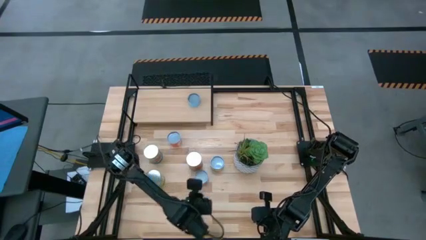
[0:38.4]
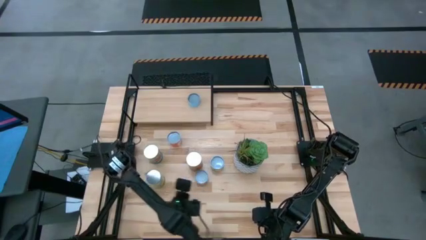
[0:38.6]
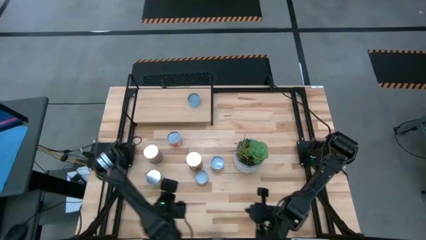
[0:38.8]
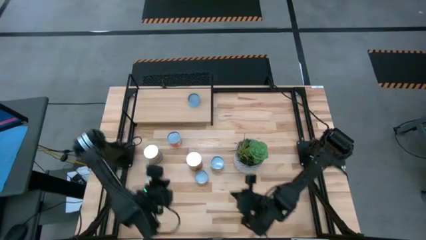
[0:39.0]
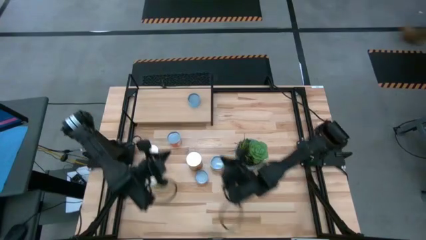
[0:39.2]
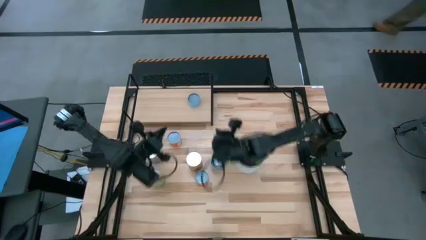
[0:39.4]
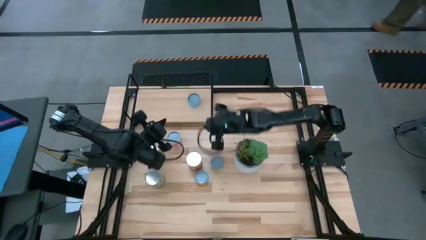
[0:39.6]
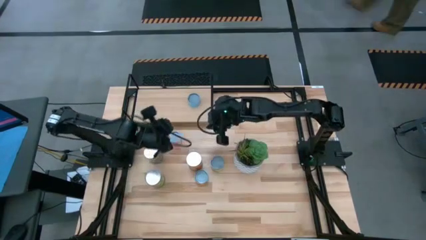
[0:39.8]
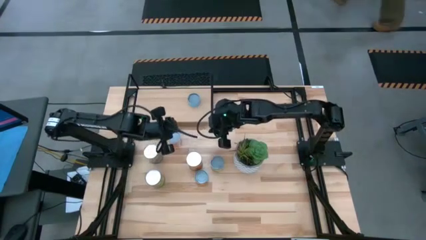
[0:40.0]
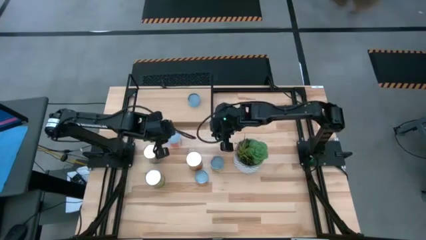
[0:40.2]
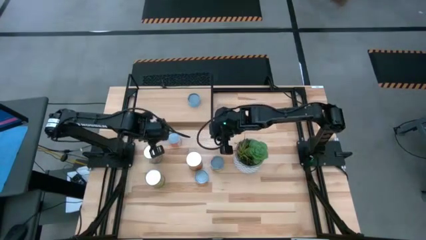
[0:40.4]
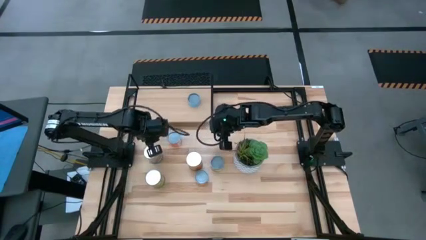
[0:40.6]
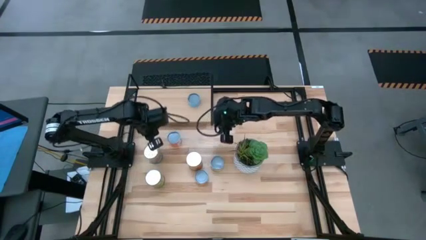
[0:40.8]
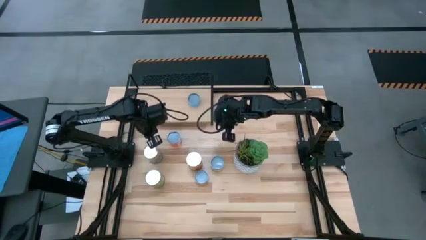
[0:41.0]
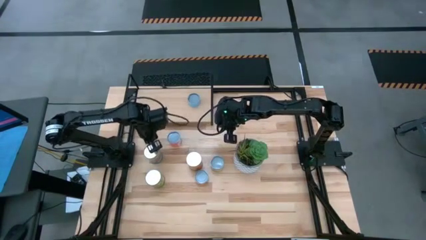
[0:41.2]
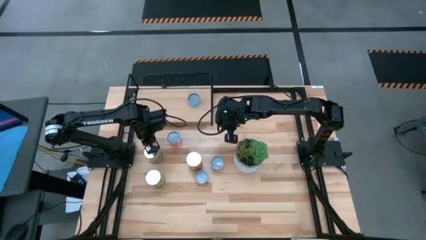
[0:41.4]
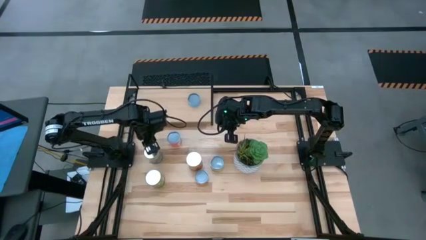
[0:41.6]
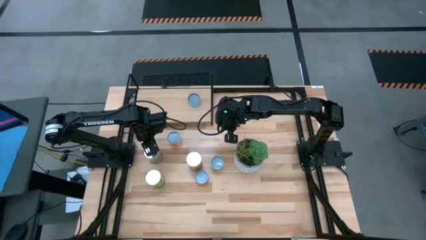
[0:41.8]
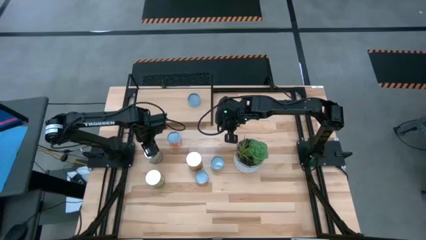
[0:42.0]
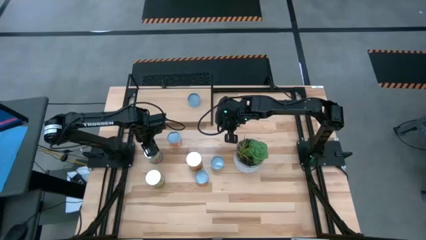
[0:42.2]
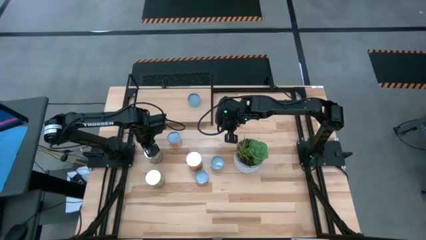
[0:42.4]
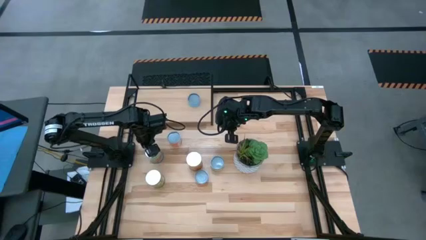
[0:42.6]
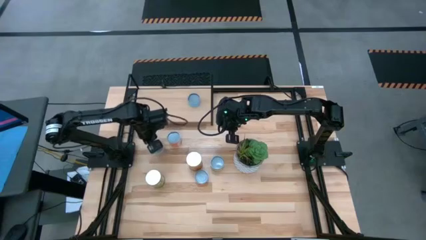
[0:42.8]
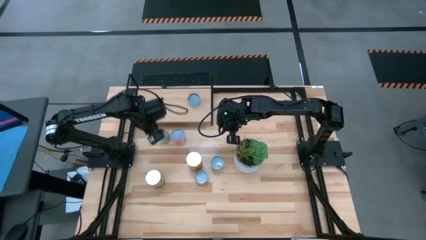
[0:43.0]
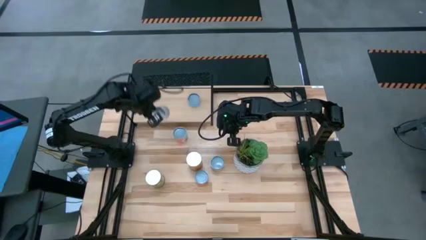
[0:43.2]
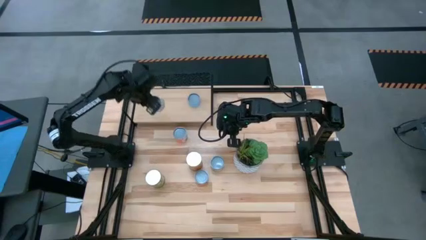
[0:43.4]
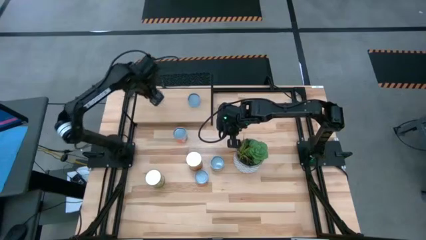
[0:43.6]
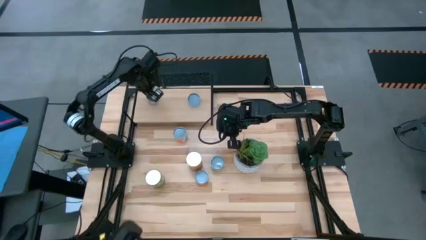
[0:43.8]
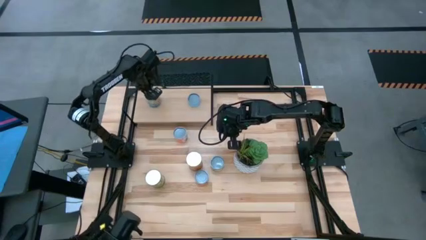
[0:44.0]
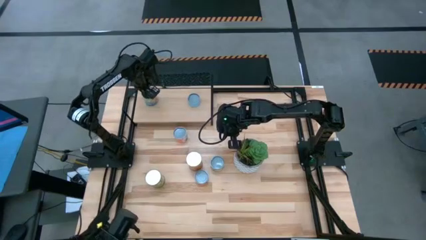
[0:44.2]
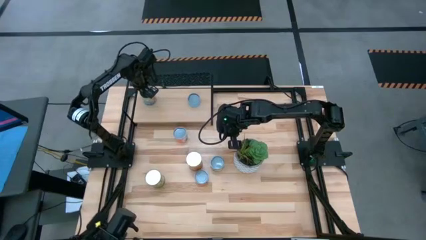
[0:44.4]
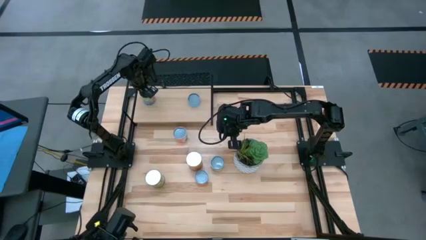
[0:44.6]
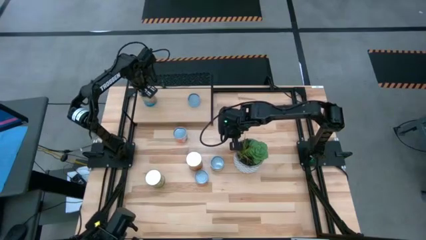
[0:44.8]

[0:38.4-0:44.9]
Task: Pick and place cans onto a shelf
Put the canned tomatoes on the shelf

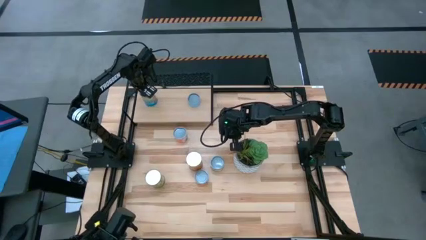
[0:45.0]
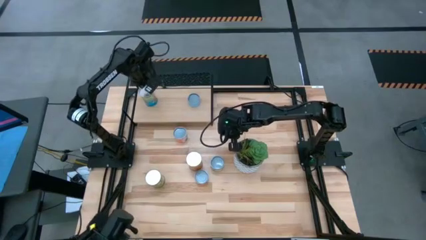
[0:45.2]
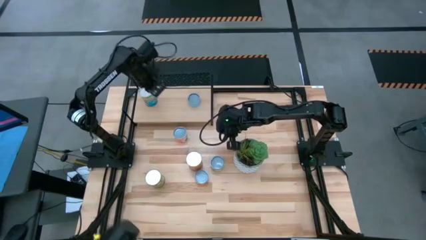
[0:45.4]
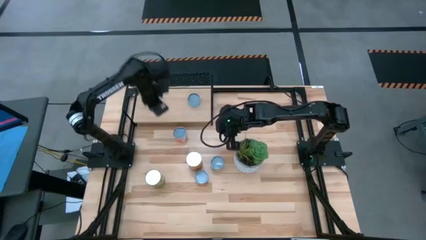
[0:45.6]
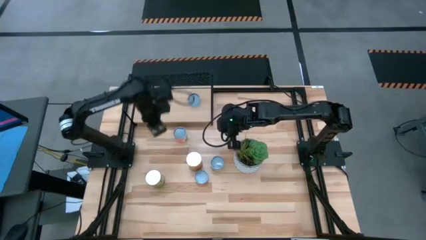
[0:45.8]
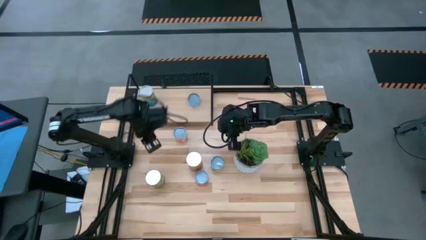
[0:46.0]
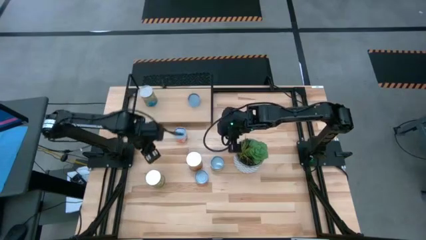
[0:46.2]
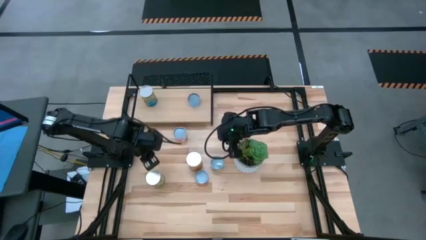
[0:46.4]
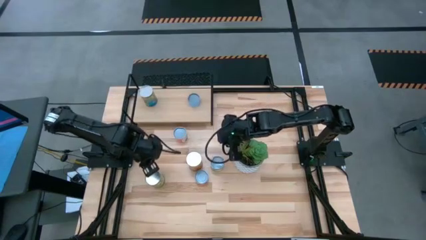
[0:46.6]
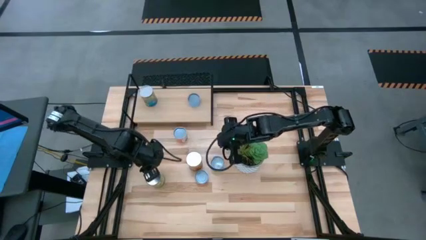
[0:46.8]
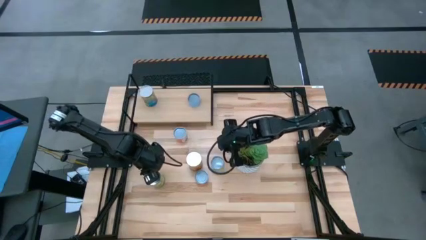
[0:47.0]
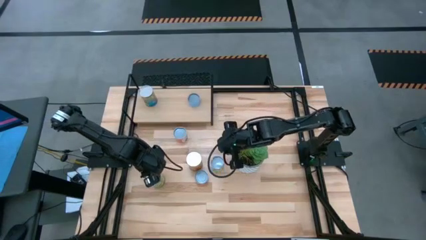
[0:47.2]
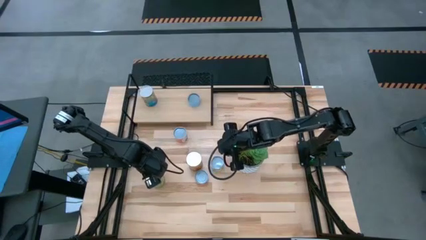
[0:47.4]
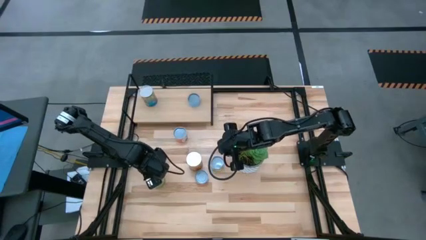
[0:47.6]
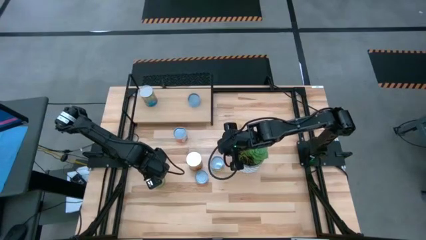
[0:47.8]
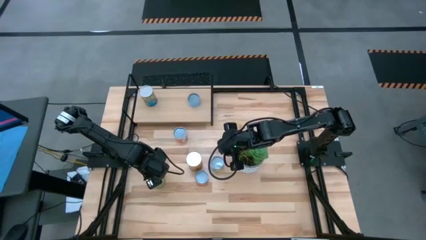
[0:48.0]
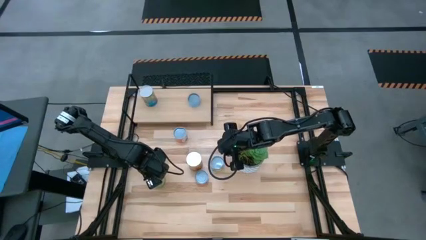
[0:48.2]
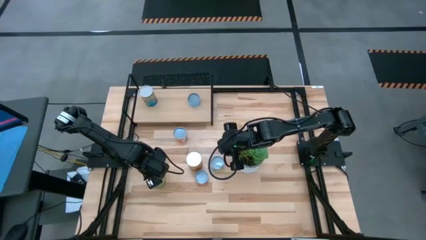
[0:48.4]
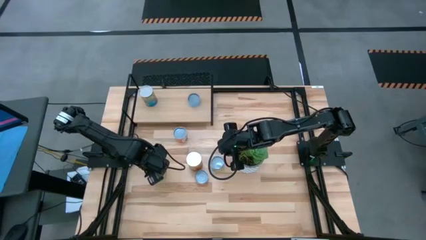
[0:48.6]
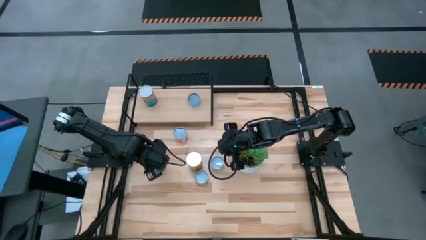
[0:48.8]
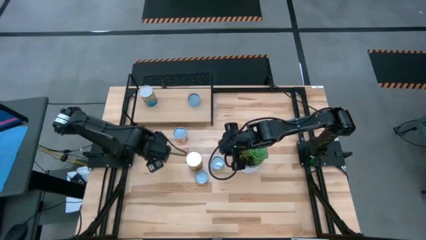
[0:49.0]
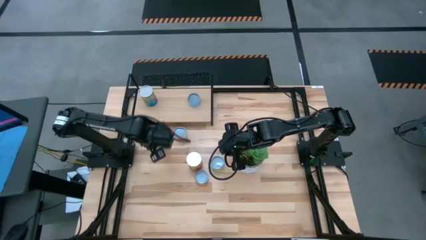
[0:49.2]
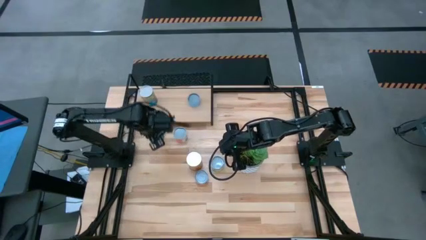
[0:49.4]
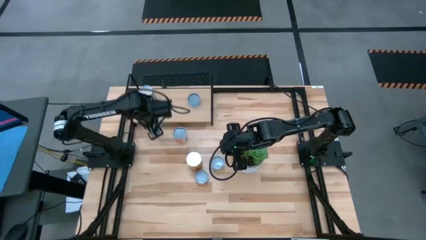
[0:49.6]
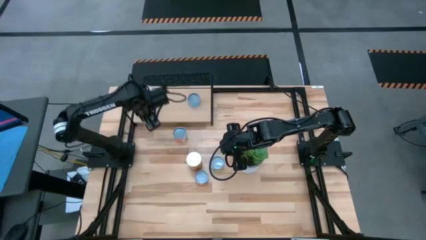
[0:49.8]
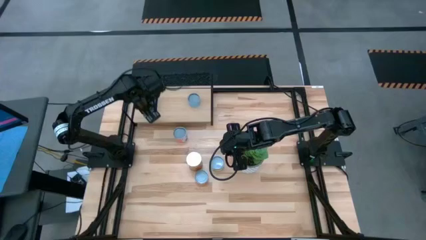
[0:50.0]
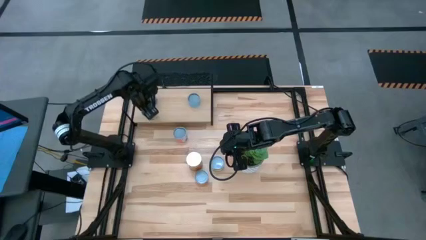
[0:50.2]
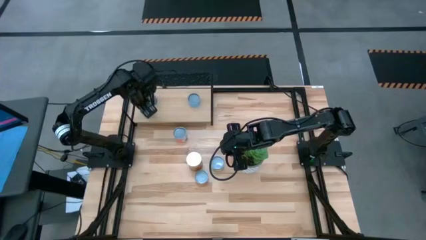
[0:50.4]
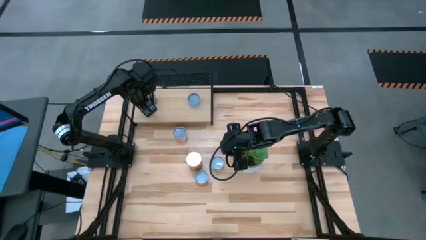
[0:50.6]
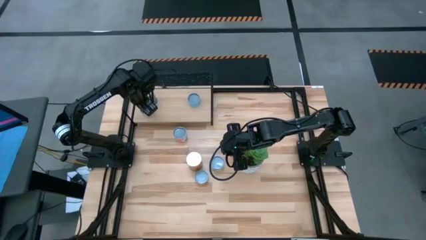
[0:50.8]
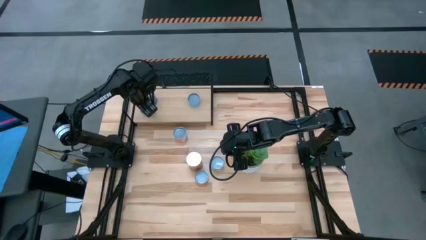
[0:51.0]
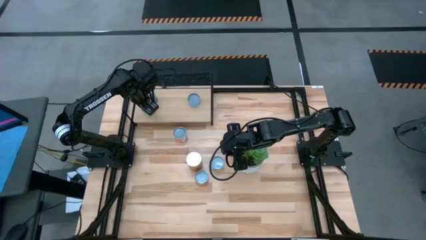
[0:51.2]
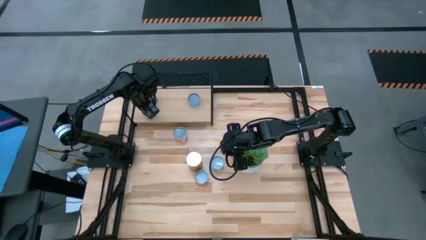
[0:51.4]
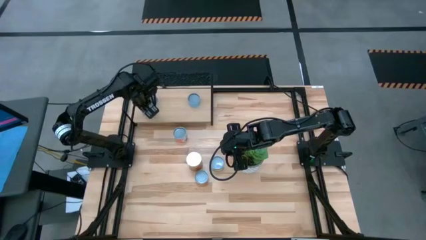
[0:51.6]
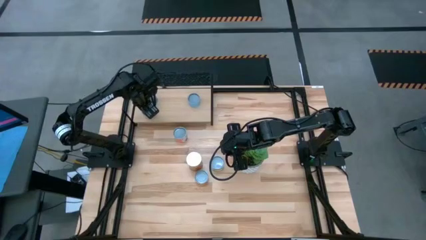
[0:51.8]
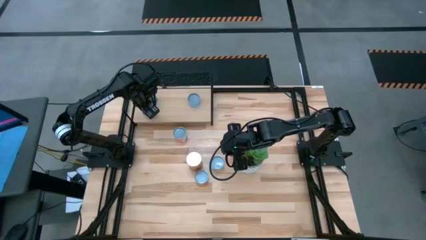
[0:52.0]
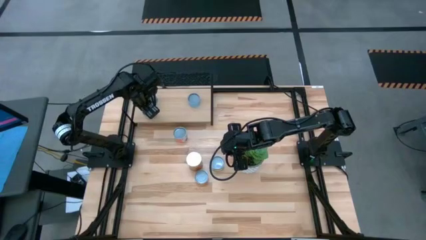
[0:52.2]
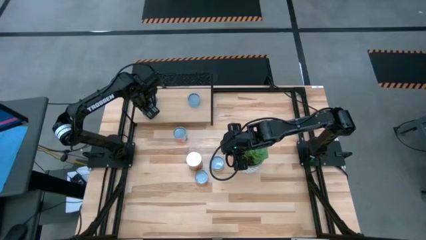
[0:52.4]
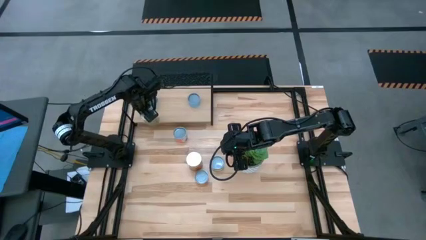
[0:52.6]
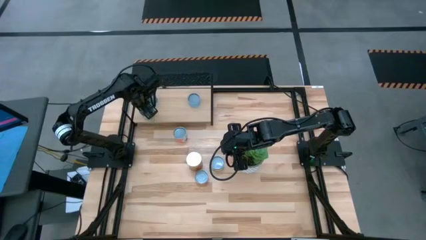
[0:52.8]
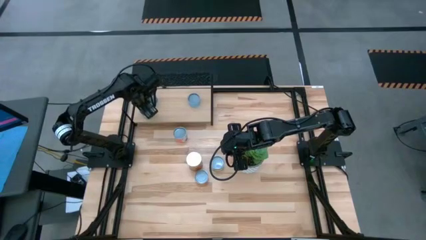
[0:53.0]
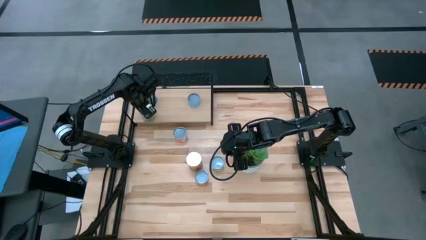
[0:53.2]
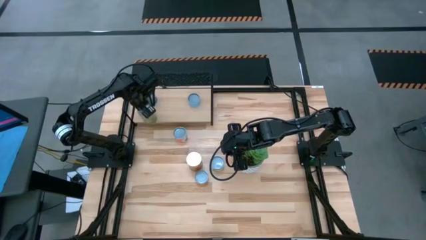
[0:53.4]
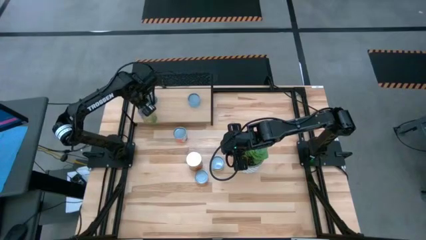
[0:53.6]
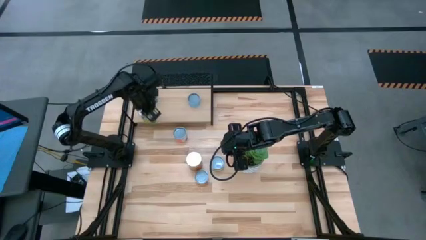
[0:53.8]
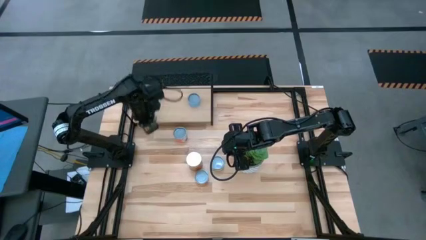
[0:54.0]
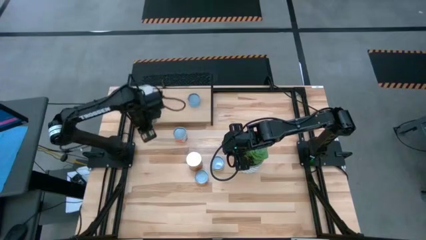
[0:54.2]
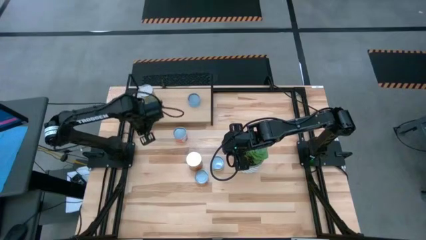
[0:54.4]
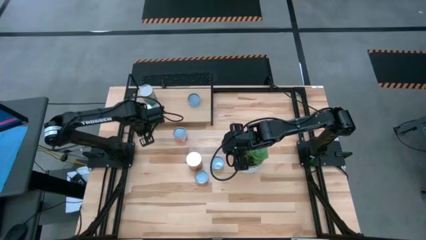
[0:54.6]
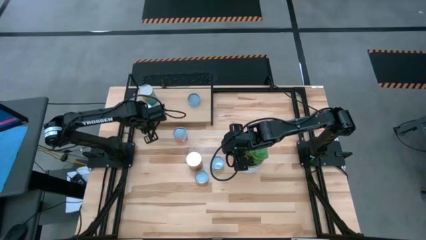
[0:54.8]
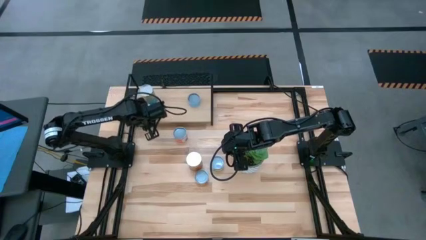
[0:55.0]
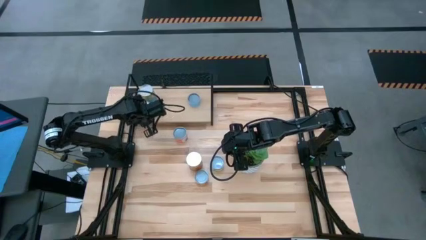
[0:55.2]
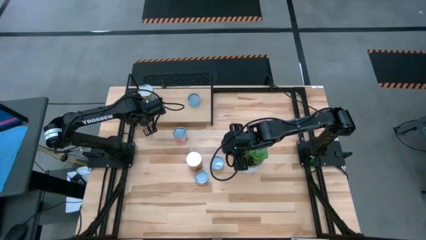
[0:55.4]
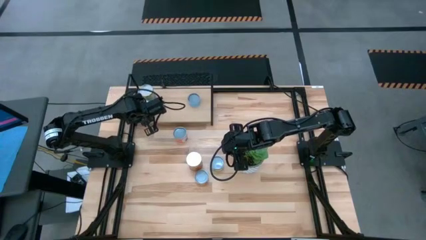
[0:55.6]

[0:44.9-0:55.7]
Put the canned pears on the shelf

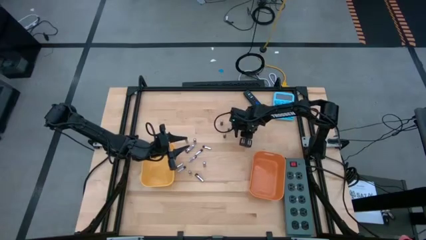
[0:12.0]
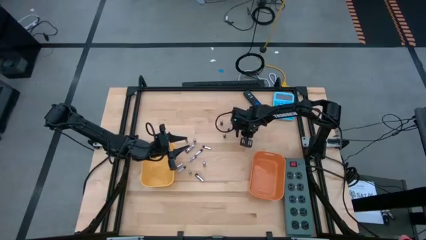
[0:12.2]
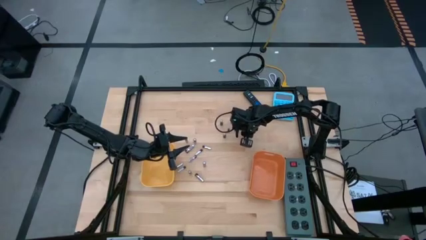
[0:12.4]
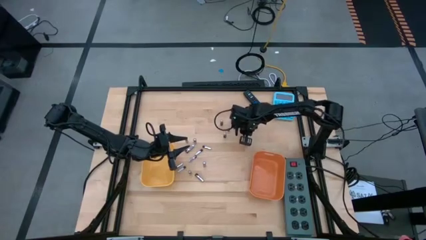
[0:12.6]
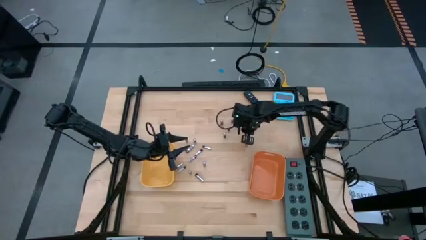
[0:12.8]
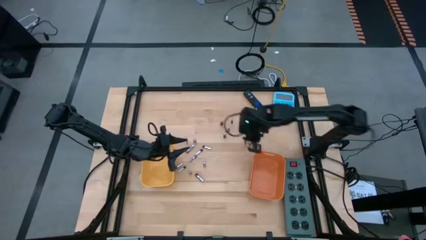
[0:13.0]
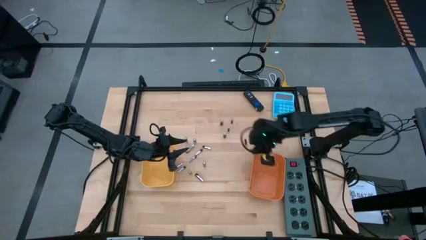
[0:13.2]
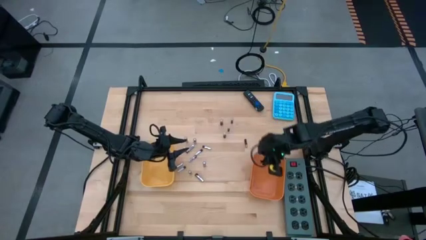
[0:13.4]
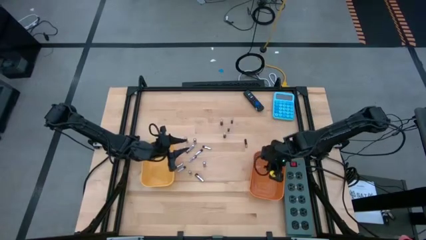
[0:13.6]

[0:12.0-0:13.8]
Task: Sort batteries
Put the black battery into the orange bin
